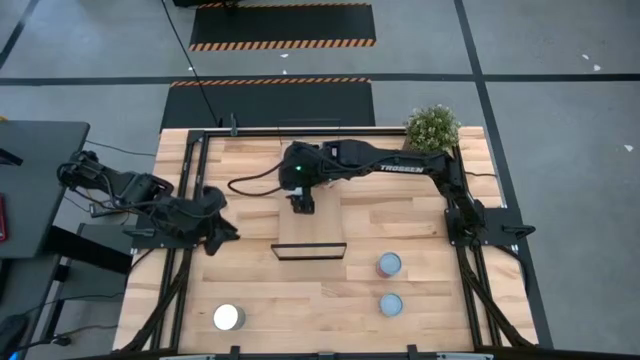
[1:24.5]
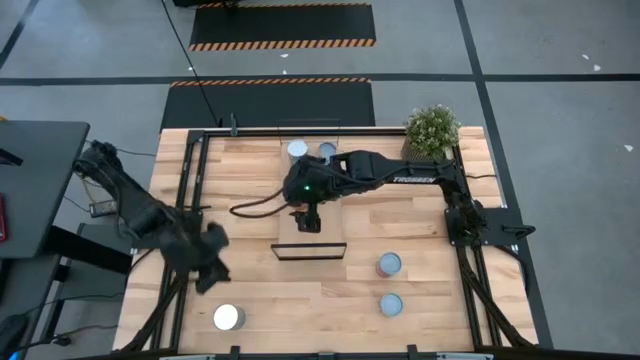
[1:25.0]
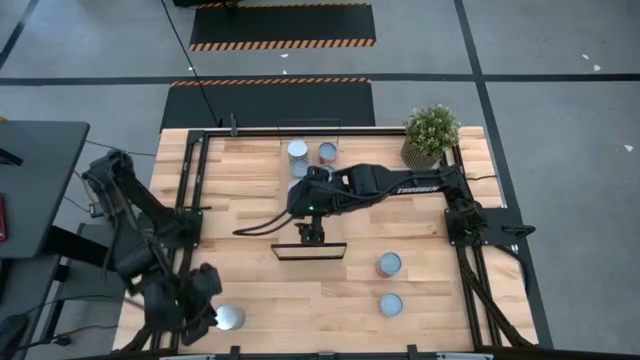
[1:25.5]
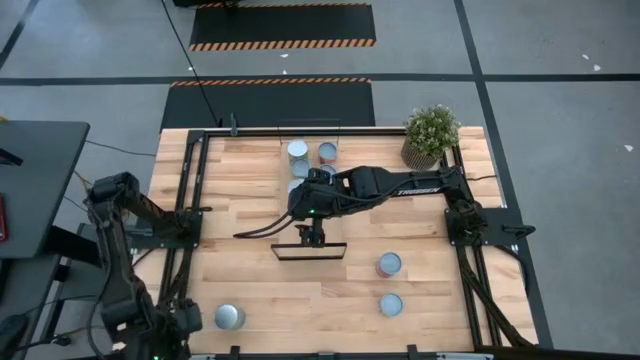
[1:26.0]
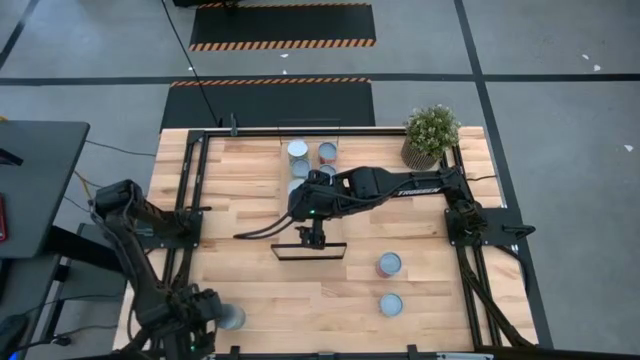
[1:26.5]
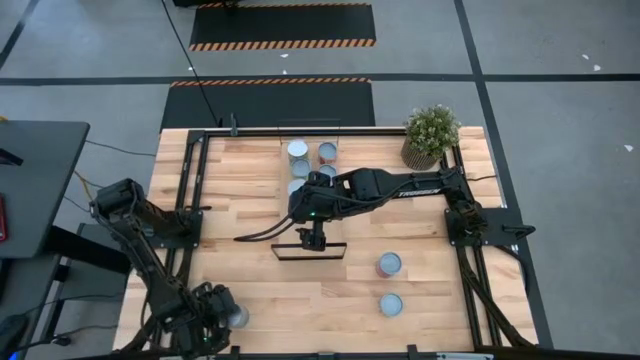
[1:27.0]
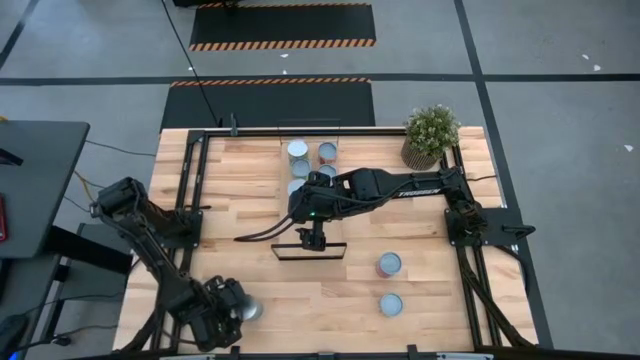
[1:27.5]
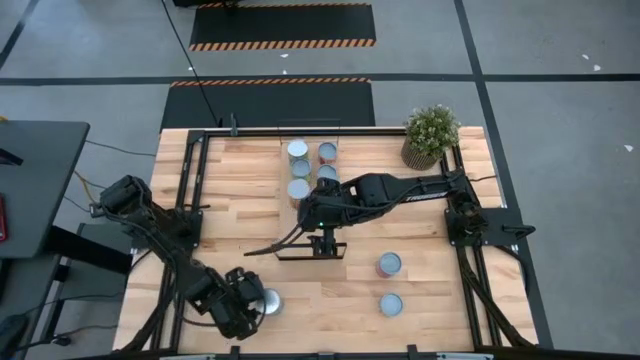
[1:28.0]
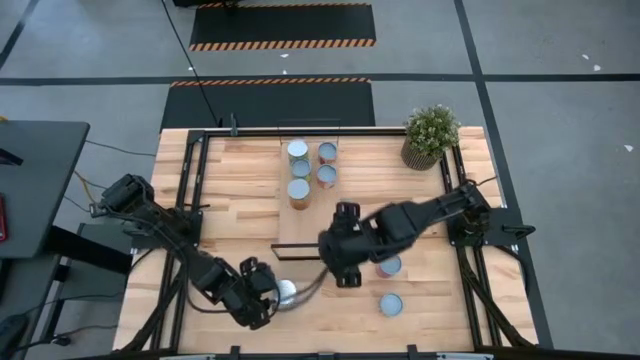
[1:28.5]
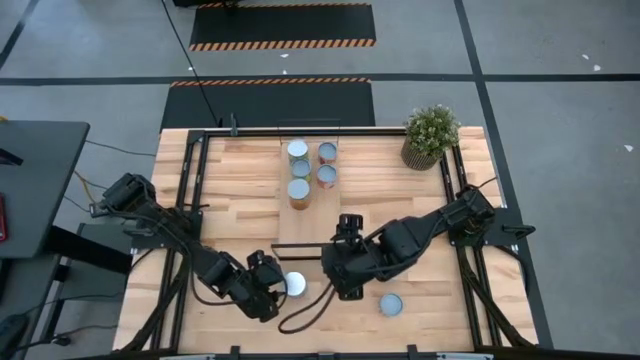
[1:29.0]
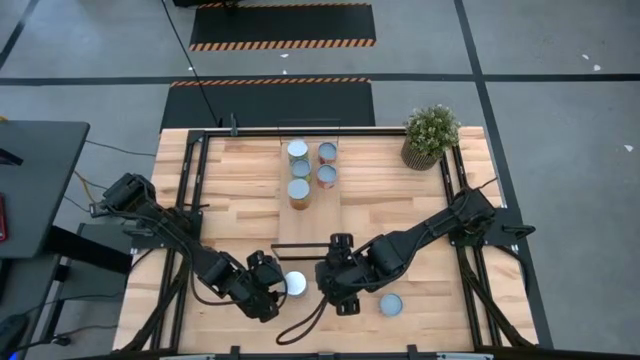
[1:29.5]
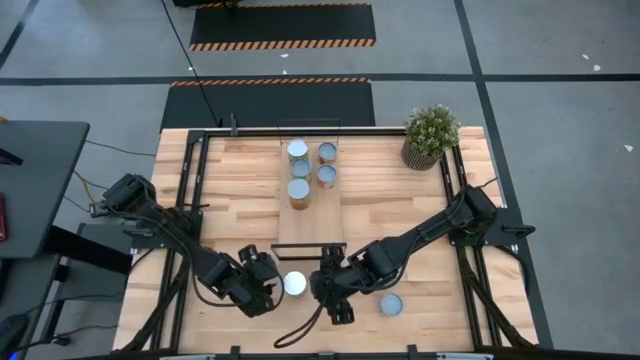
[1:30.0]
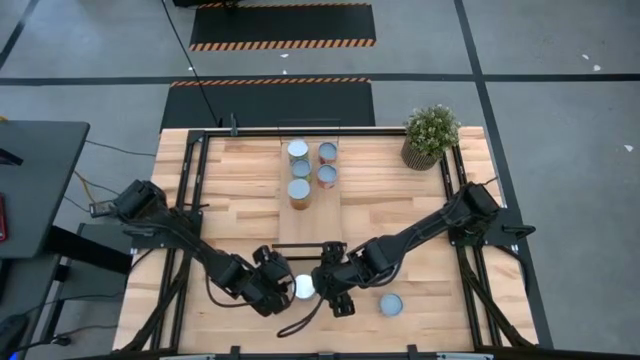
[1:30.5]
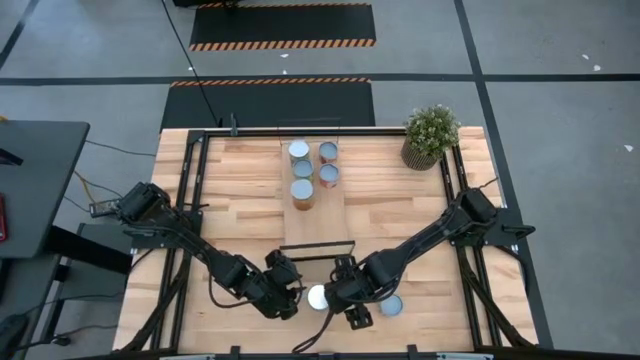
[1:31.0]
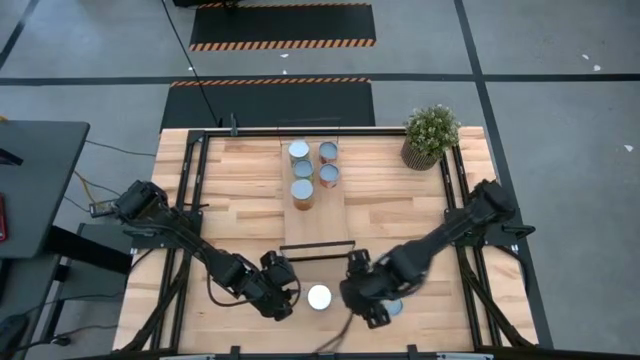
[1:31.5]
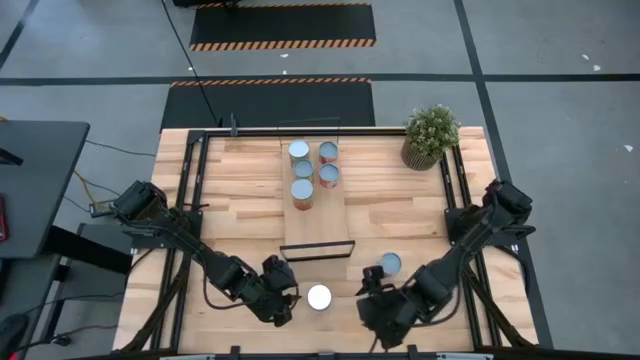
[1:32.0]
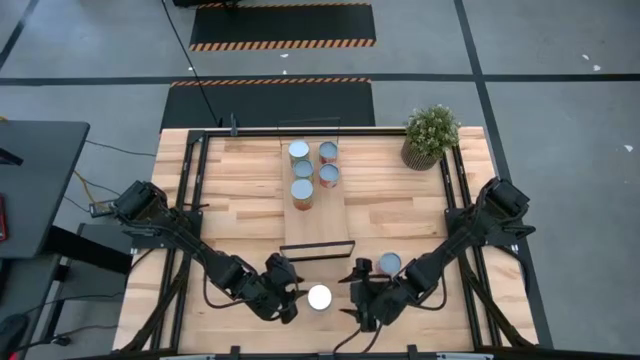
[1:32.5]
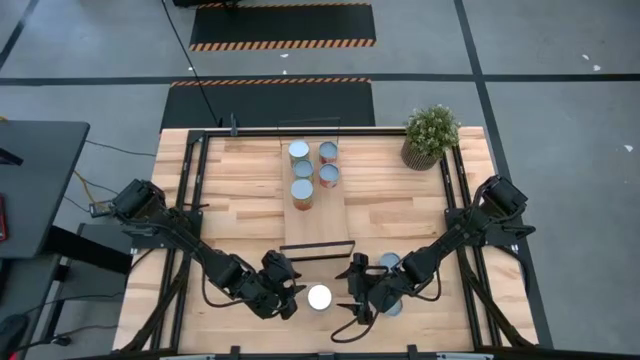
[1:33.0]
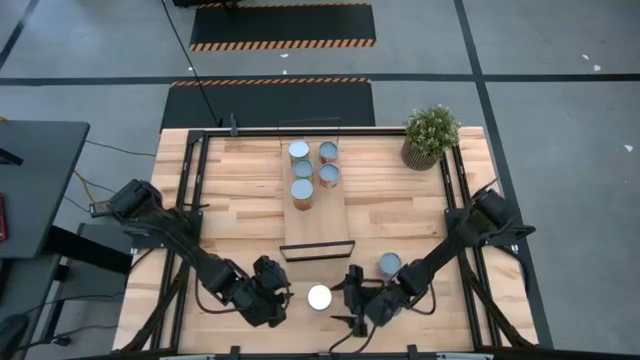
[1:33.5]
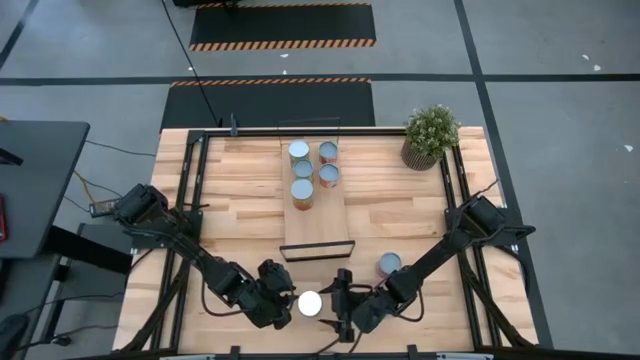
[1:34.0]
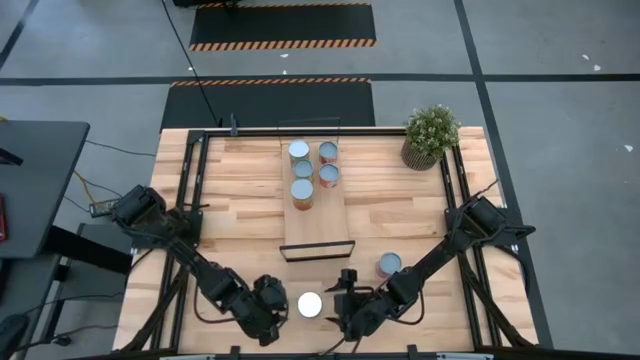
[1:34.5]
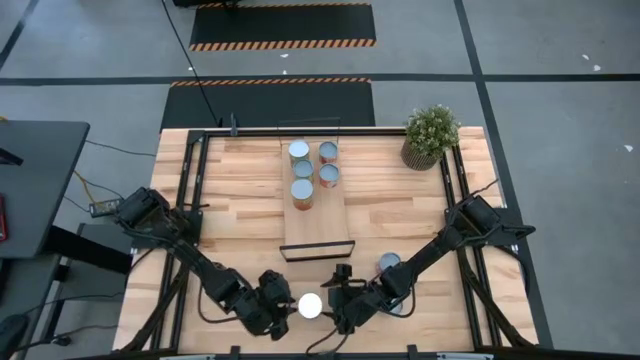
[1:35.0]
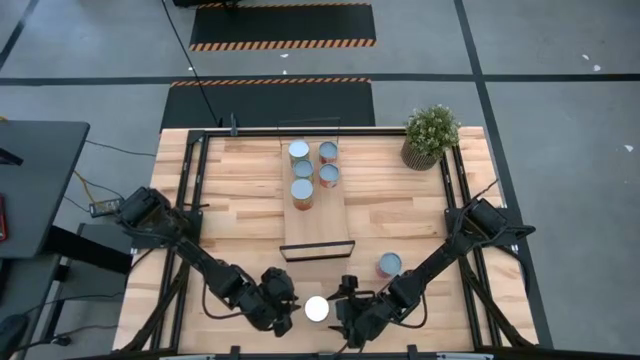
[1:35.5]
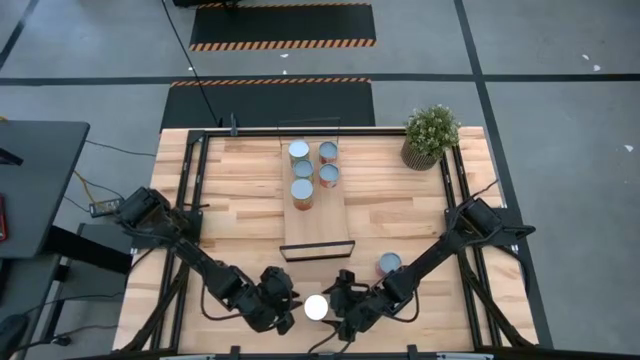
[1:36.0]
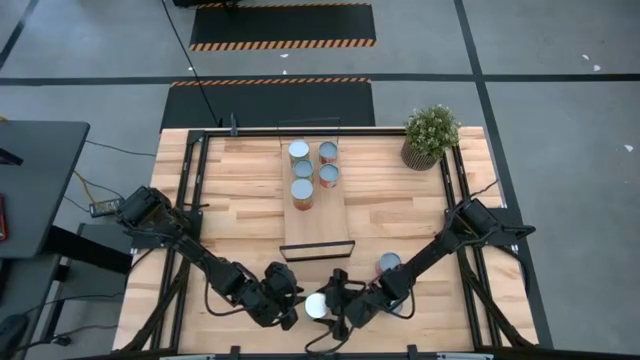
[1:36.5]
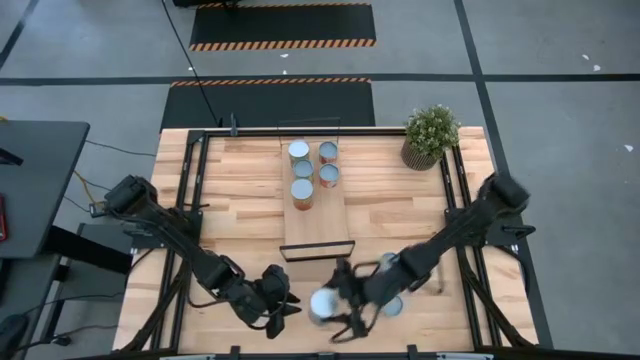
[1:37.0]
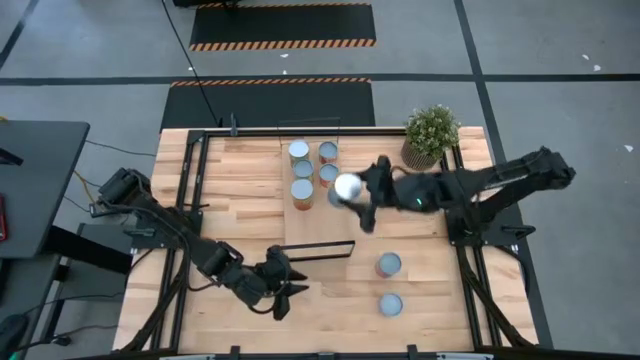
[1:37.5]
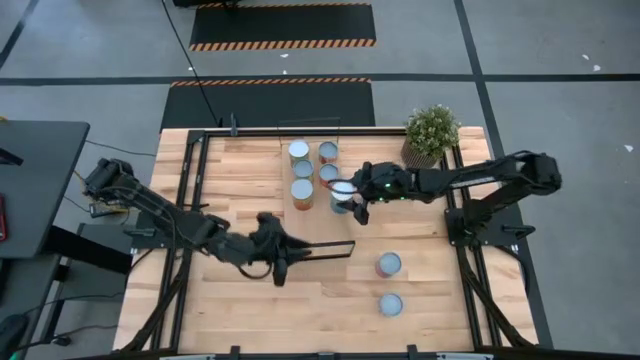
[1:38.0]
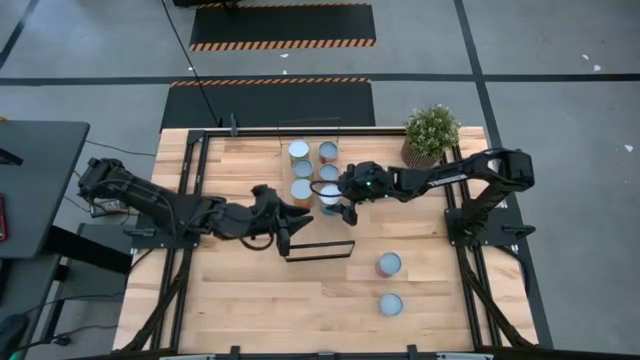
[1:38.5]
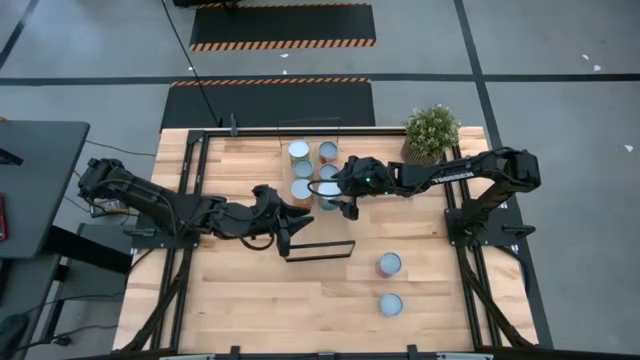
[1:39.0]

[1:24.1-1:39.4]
Task: Pick and place cans onto a shelf
Put the red can on the shelf

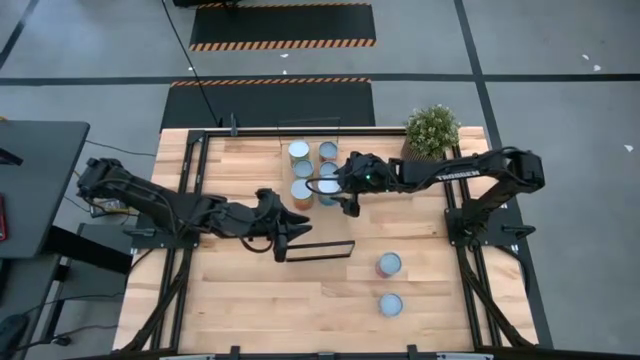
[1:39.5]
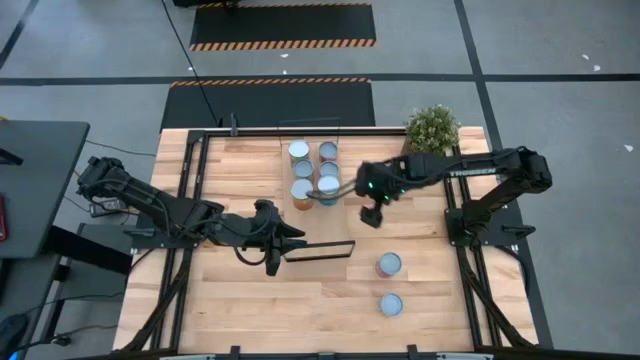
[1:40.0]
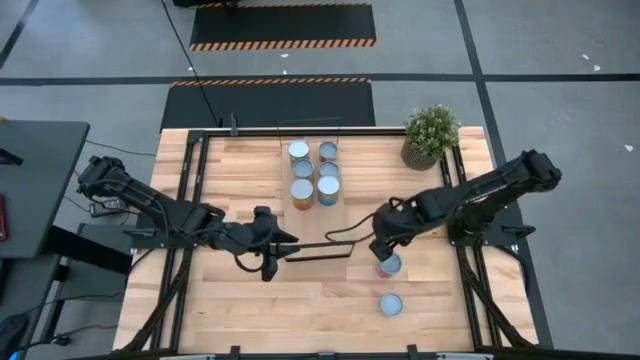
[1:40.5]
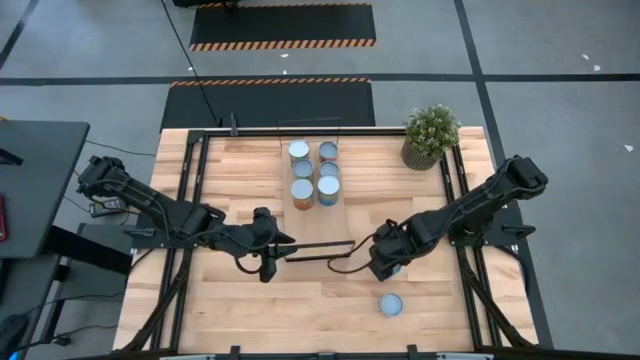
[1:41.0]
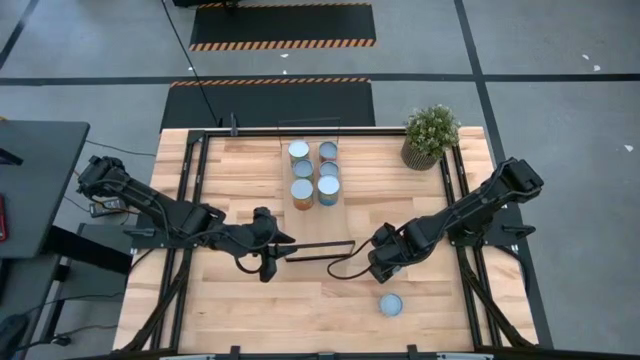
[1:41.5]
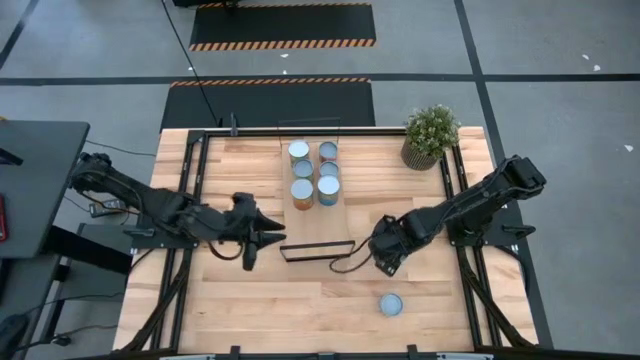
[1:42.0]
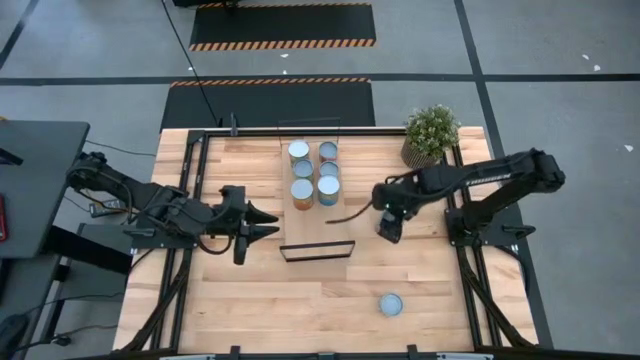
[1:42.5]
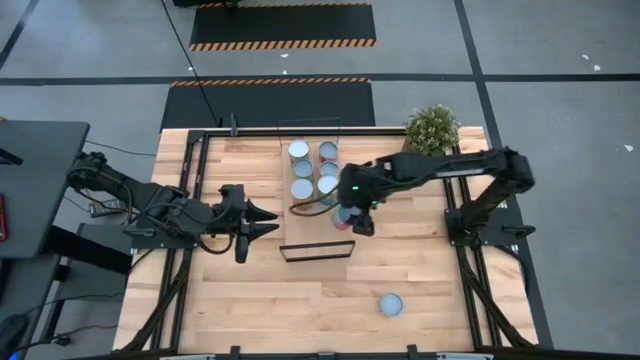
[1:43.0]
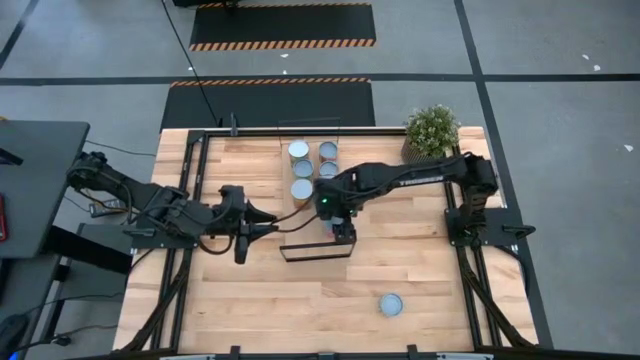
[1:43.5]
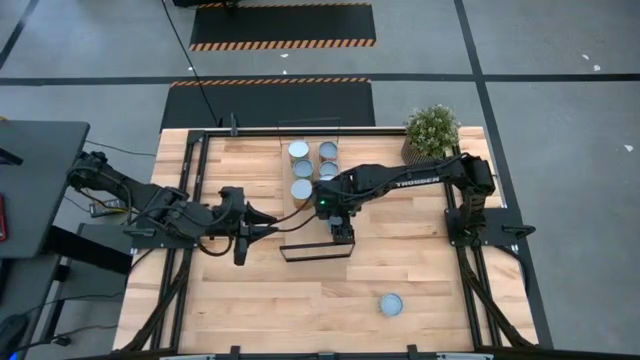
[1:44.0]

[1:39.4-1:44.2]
Put the pink can on the shelf

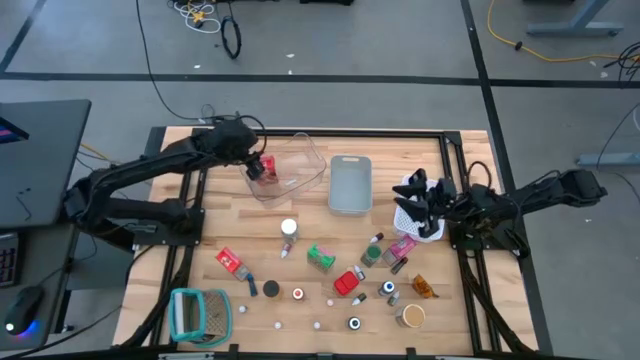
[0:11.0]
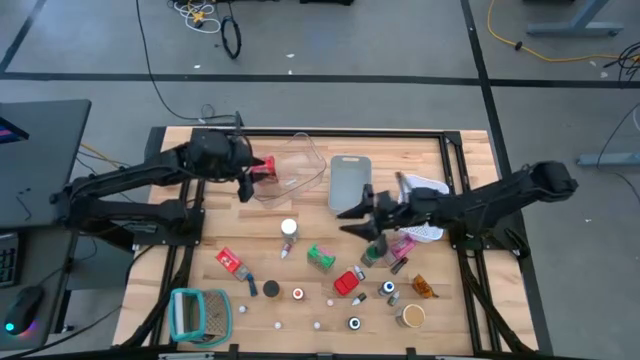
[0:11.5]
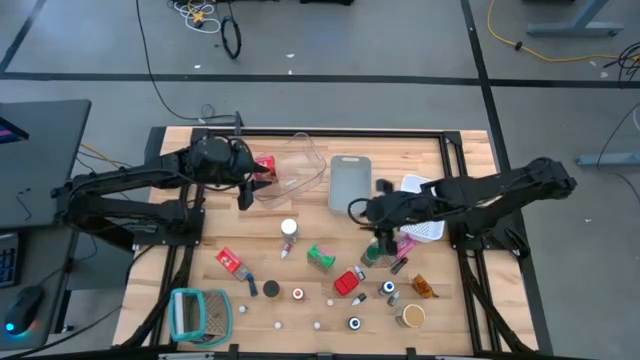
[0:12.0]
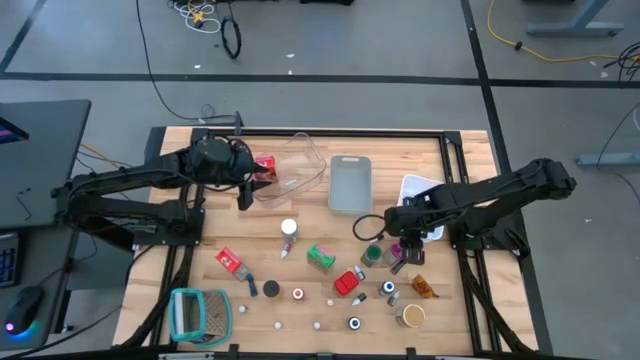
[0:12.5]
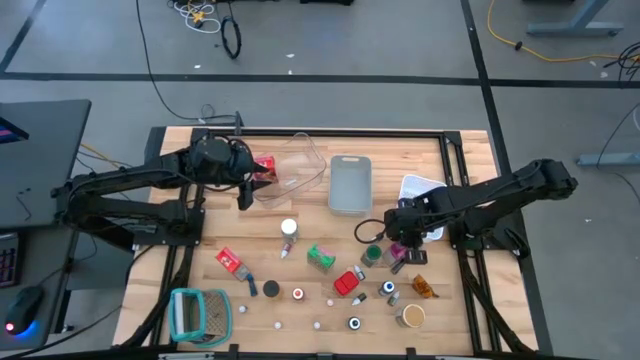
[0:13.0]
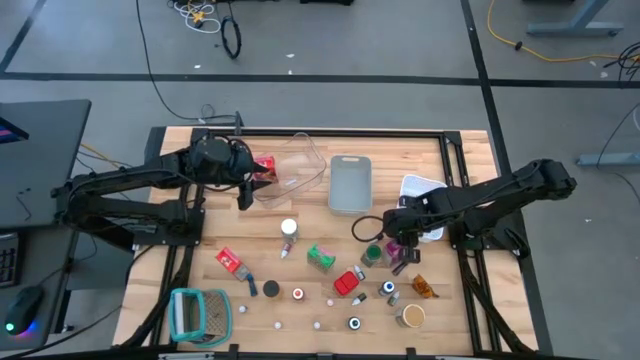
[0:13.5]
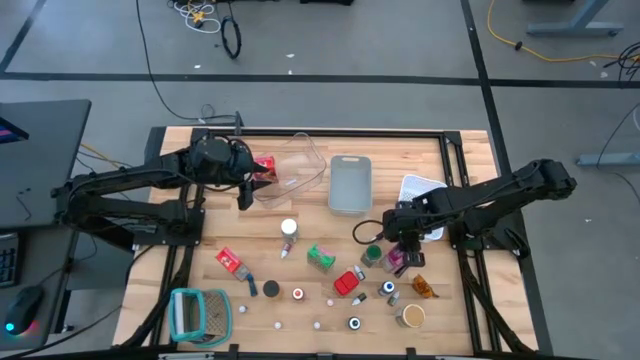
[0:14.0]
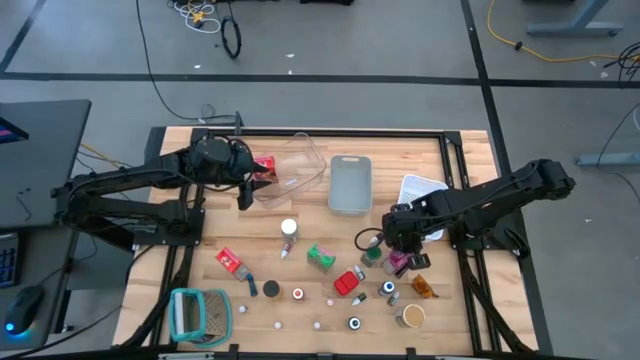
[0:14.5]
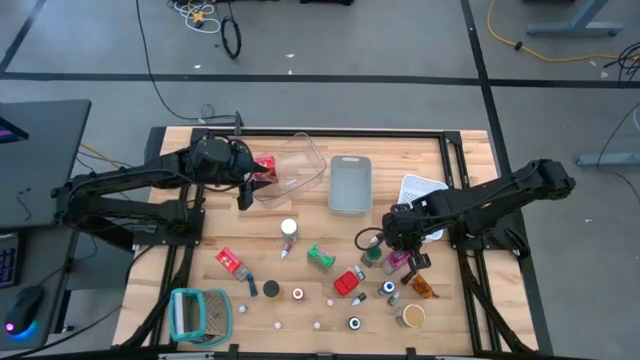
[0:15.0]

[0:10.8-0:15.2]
Task: Pick & Place Kitchen Items
Put the purple cereal box into the transparent bin
